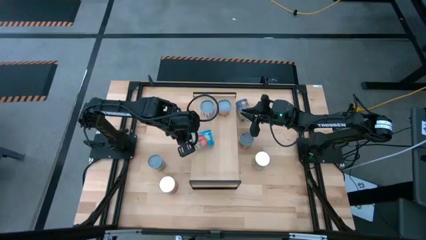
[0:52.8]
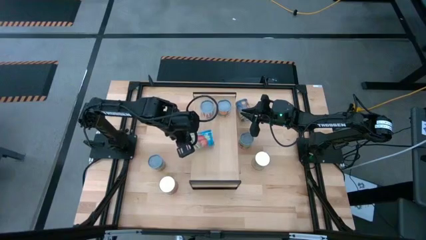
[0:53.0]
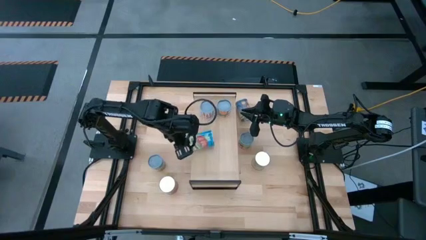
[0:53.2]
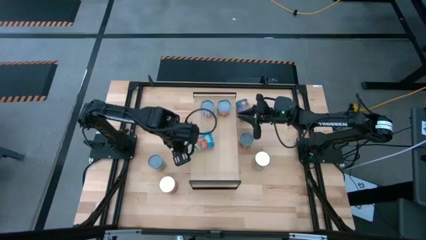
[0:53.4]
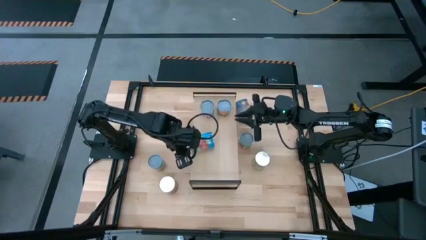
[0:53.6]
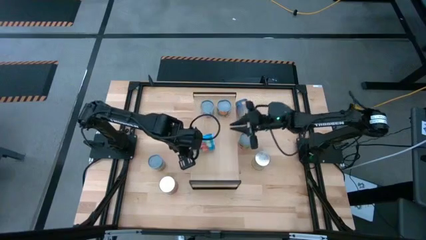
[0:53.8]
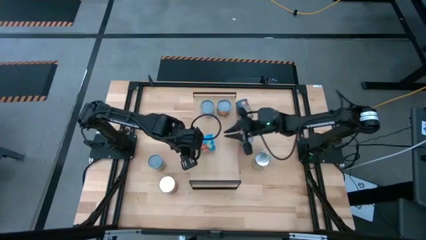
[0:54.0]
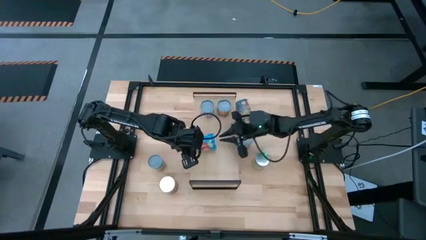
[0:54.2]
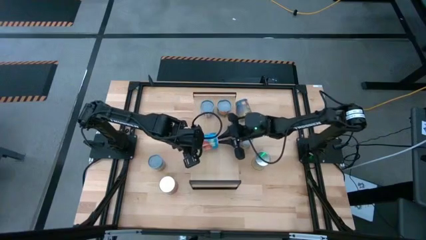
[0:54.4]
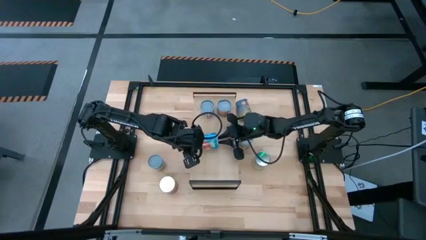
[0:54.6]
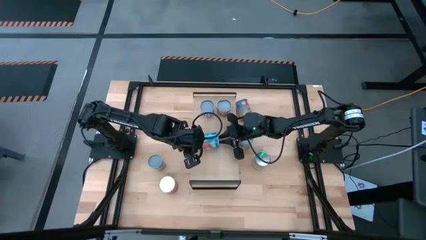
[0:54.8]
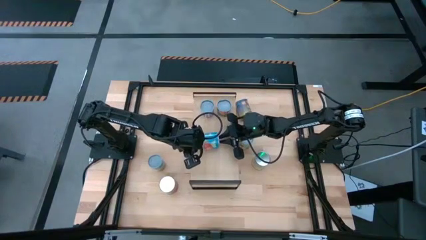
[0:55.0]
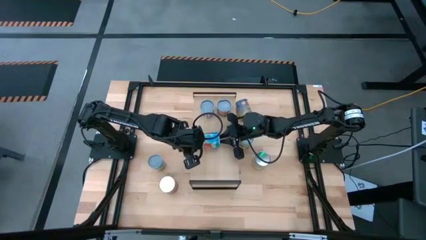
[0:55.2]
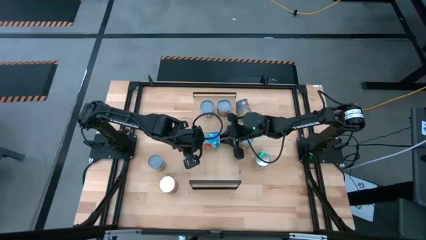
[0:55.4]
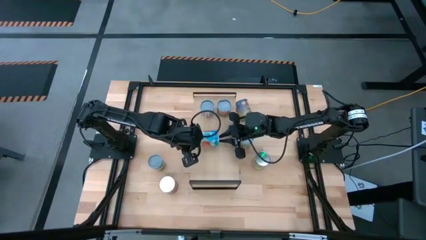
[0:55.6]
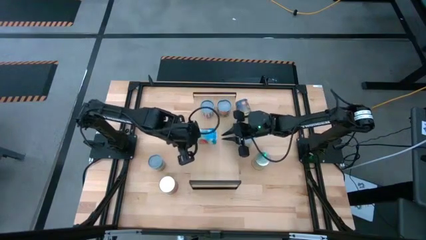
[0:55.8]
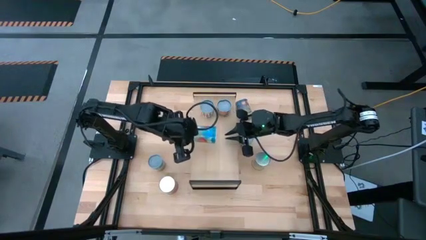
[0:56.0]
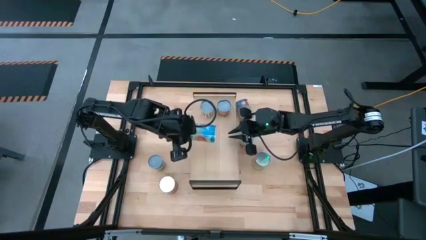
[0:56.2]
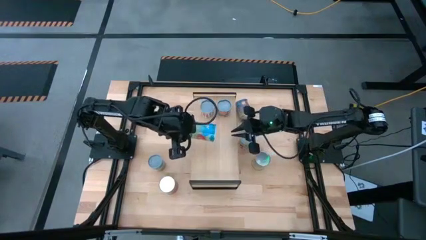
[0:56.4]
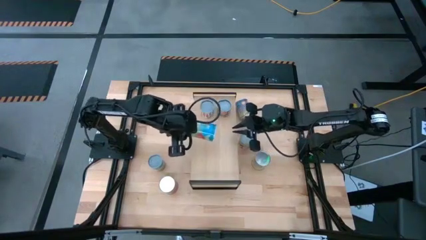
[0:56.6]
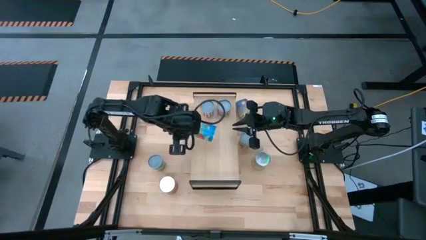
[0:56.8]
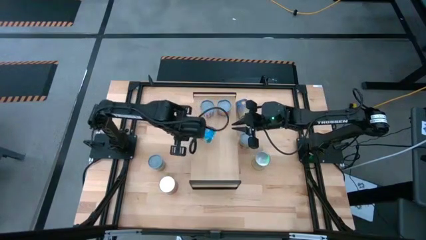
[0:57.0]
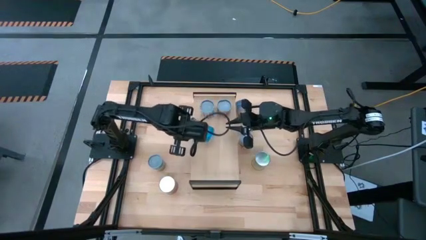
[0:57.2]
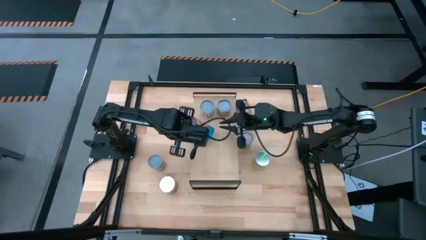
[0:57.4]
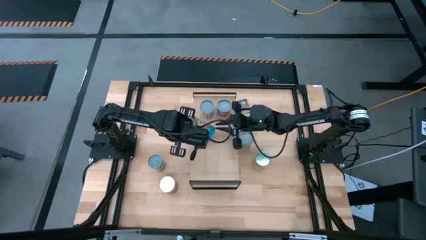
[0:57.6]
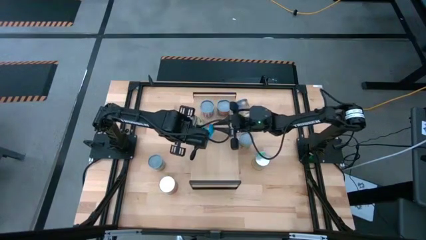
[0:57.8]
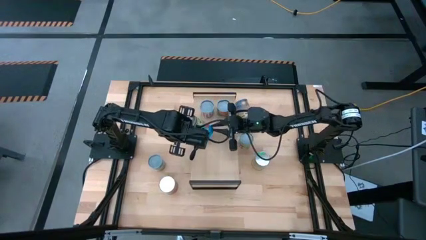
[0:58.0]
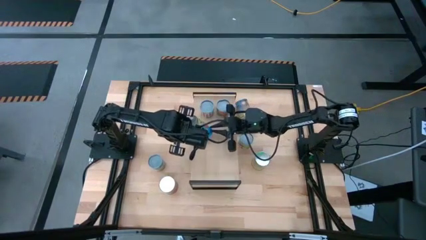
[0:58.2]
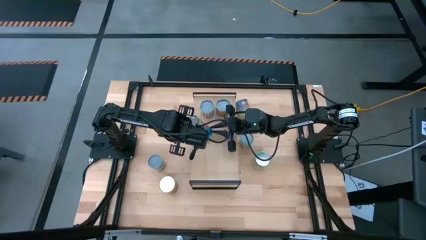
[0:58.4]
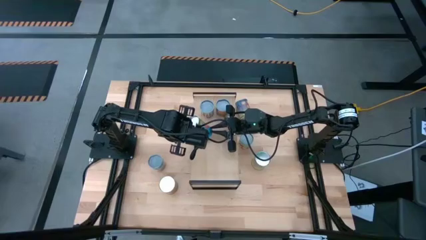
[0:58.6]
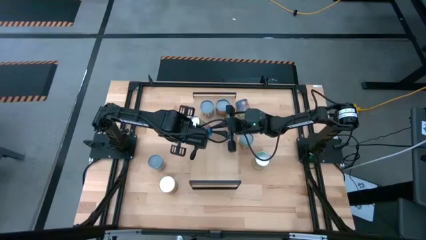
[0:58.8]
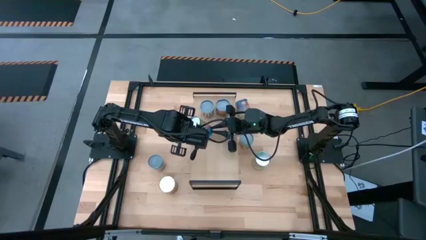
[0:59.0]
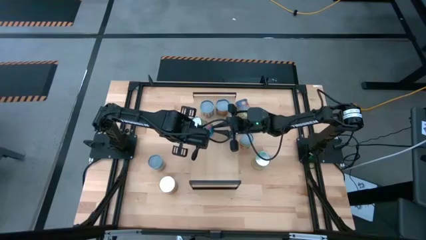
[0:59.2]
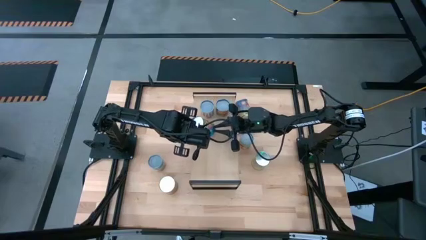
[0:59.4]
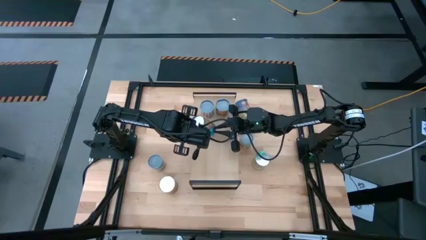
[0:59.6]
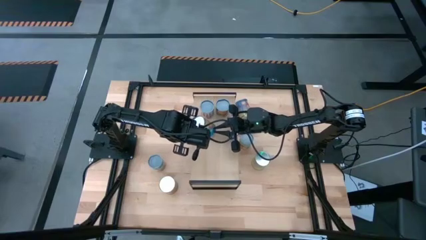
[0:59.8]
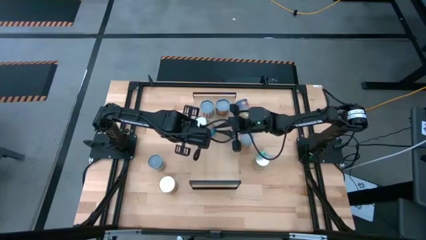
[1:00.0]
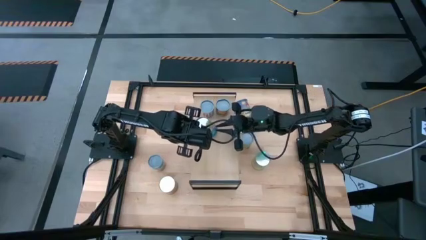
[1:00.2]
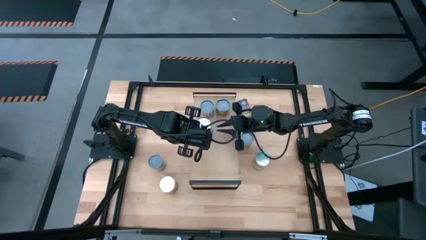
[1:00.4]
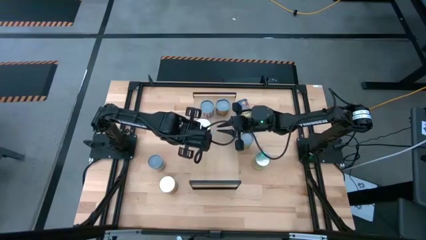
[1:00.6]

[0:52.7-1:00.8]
Task: Pick and place cans onto a shelf
Put the canned tomatoes on the shelf

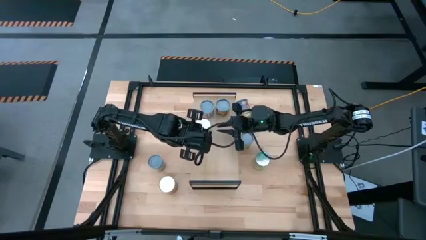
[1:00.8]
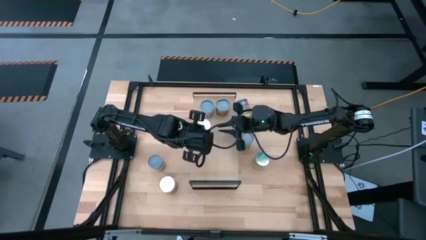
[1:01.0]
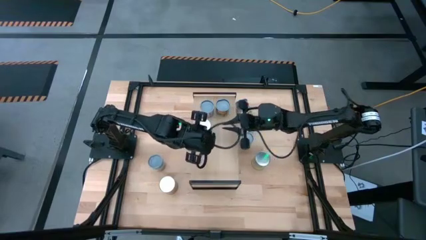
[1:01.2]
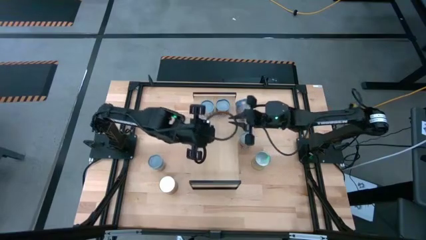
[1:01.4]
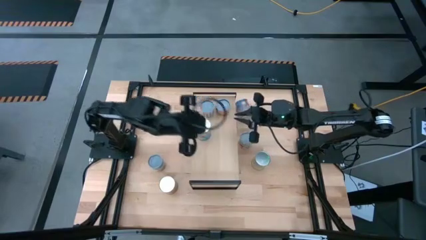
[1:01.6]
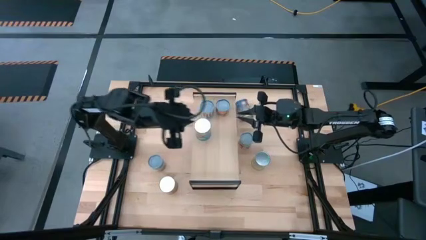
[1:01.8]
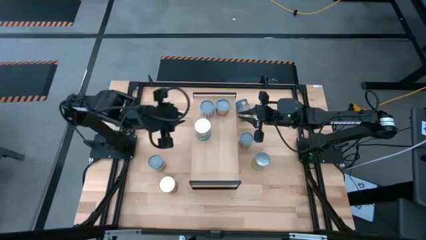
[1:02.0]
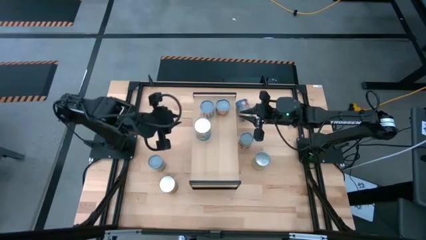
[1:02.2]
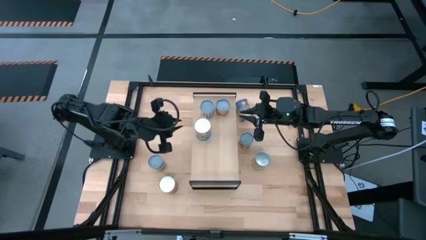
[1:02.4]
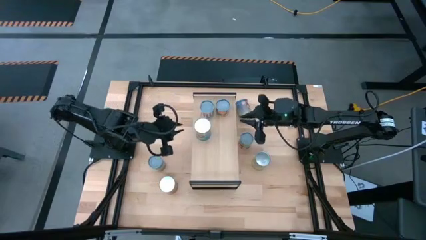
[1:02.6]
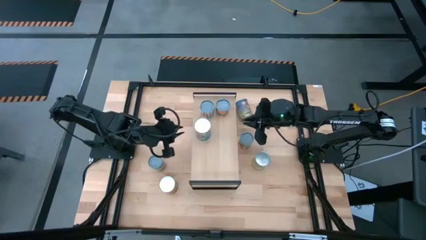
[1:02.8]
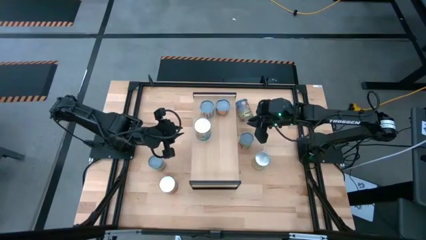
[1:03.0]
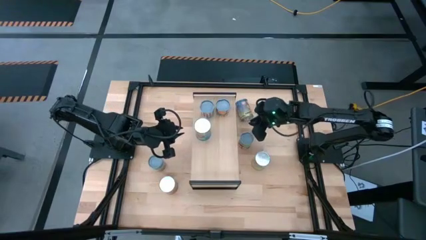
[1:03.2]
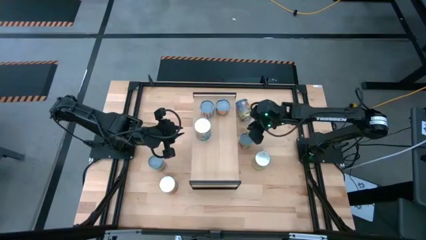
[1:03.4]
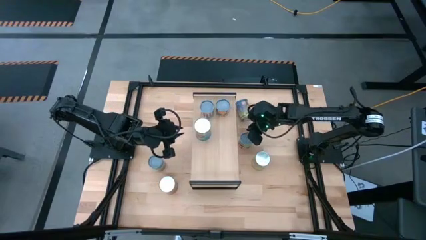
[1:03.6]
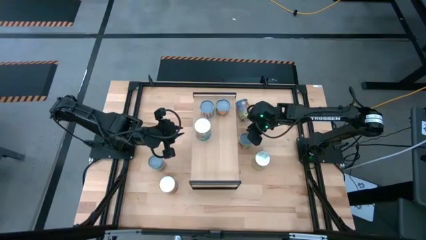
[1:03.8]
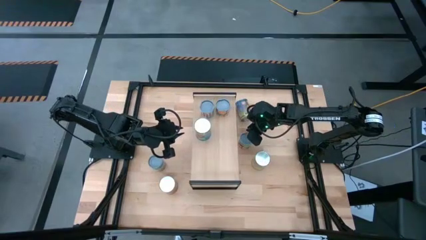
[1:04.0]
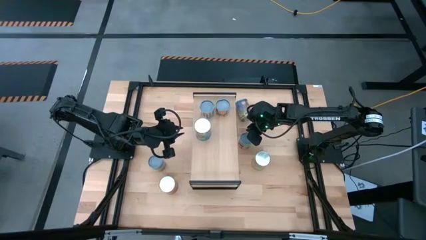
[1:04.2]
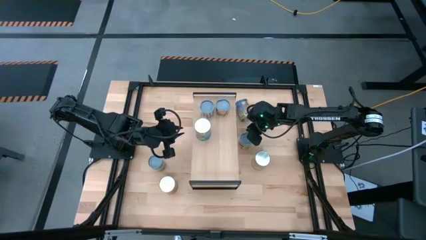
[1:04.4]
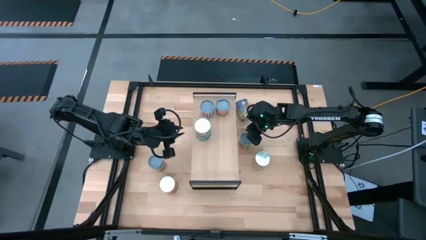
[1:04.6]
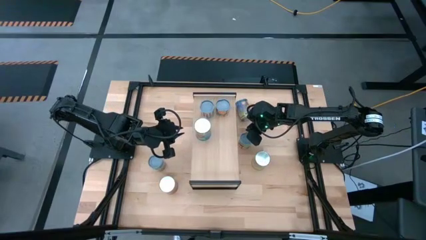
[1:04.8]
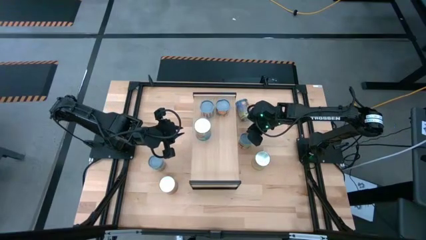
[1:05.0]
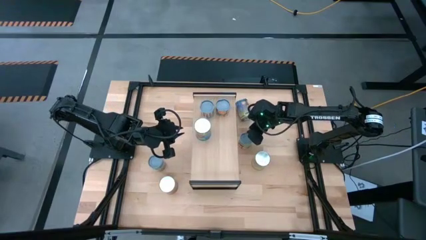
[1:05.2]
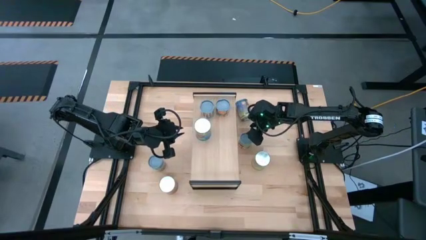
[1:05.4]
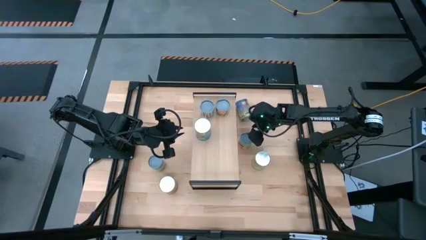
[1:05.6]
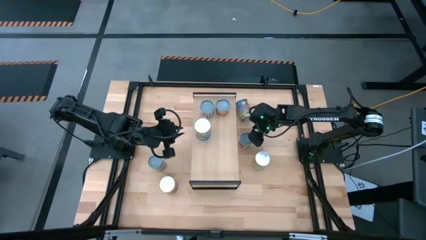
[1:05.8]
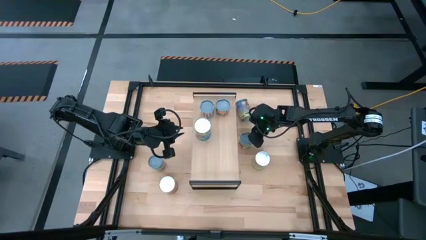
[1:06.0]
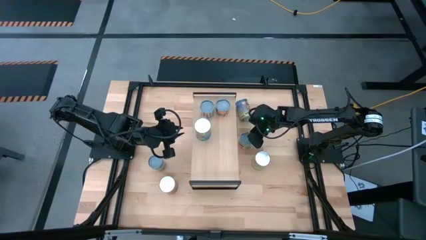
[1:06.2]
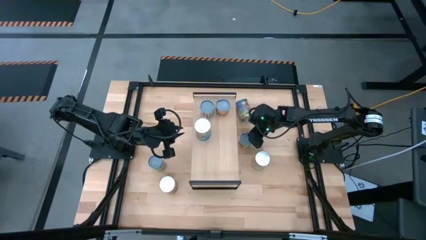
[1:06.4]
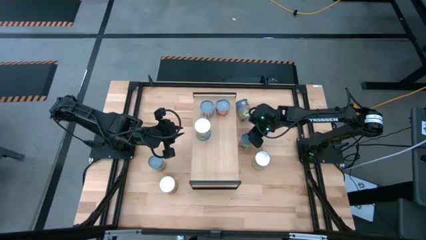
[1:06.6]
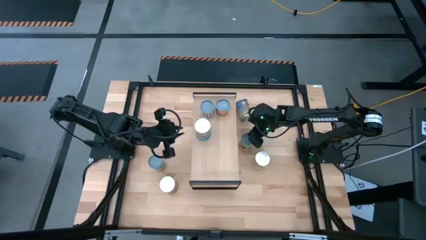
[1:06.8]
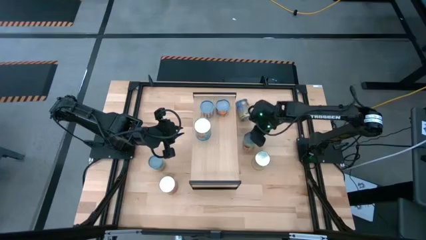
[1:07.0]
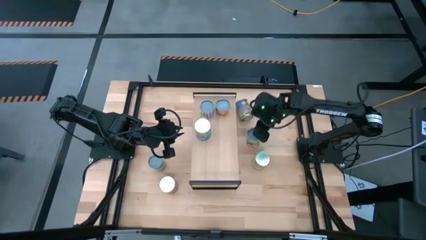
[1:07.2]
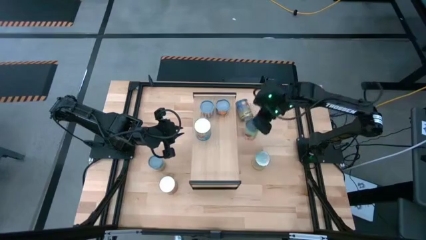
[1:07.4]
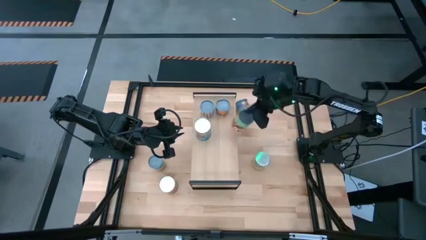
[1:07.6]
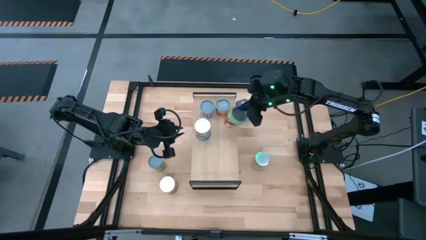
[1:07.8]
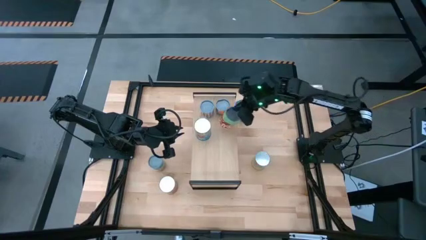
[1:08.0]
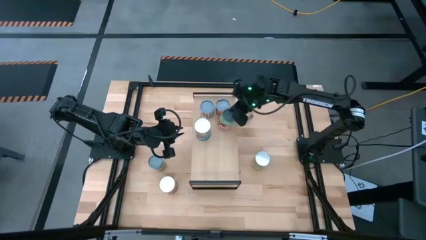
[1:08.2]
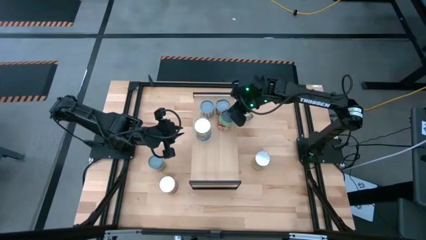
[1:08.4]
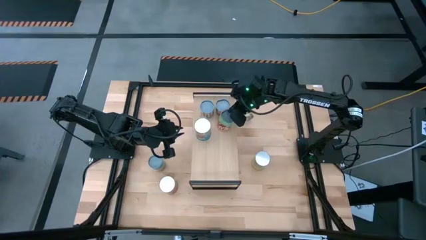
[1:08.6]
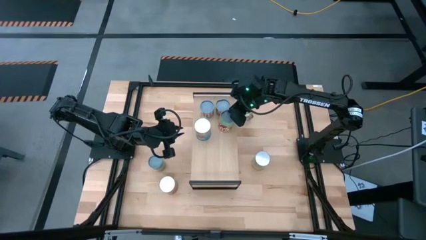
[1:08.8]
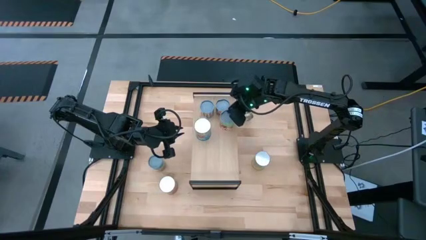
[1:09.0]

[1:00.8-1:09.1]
Put the canned beans on the shelf
